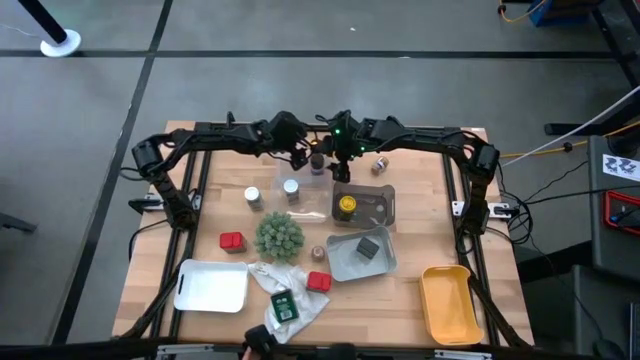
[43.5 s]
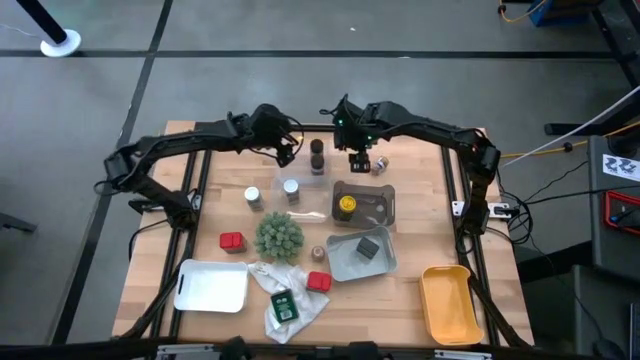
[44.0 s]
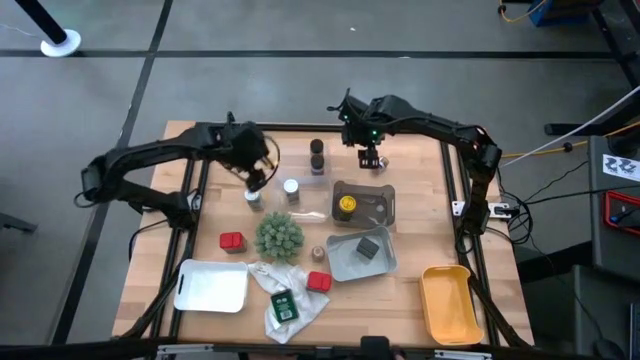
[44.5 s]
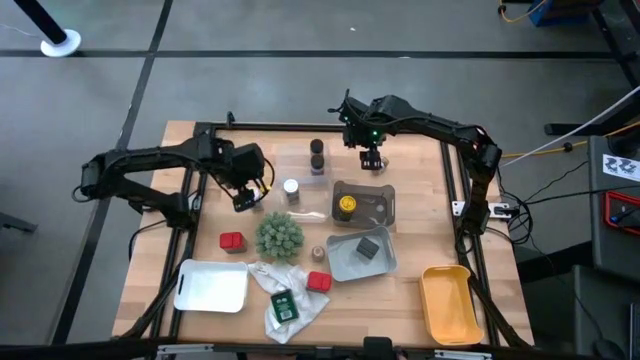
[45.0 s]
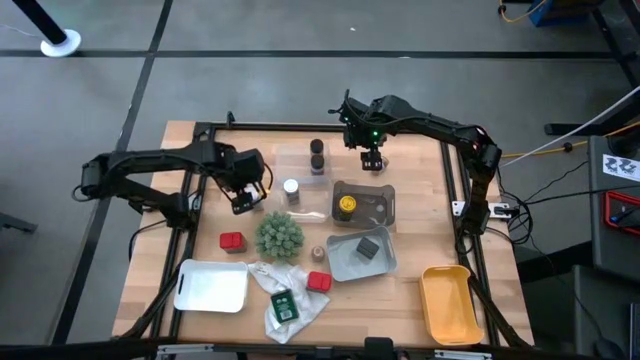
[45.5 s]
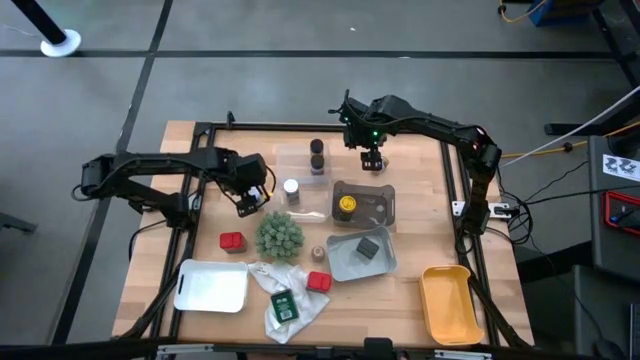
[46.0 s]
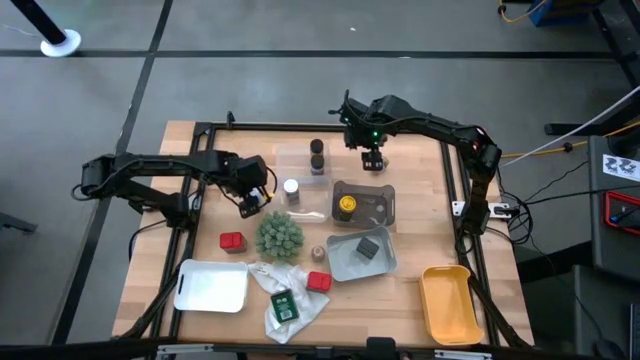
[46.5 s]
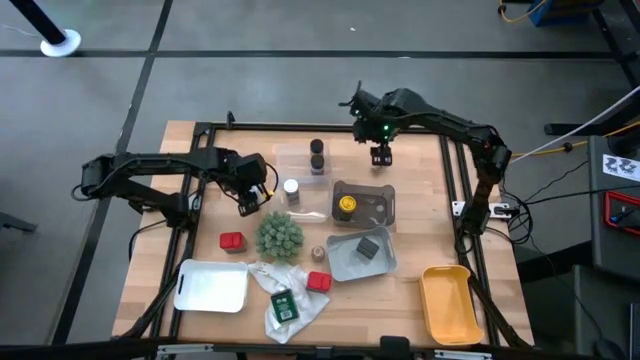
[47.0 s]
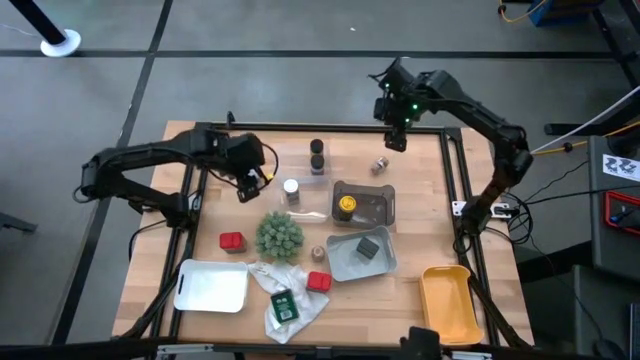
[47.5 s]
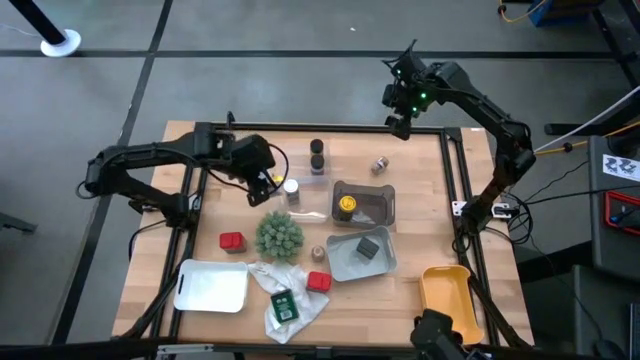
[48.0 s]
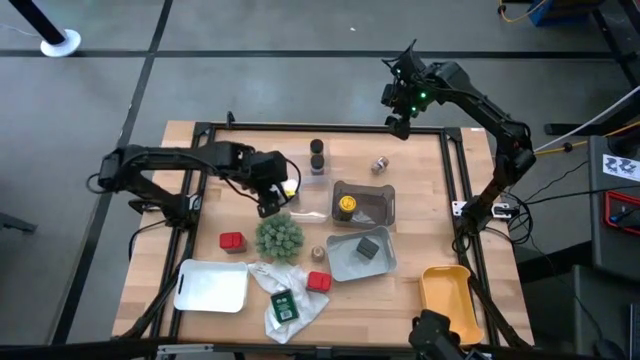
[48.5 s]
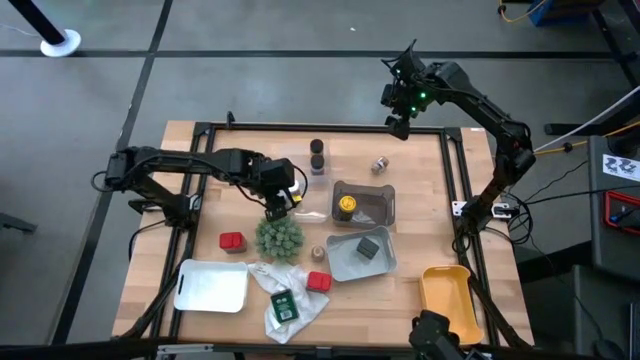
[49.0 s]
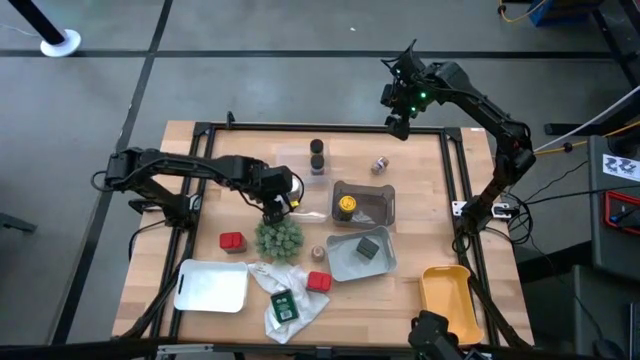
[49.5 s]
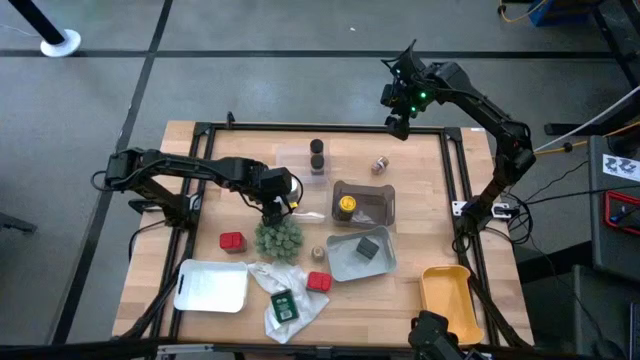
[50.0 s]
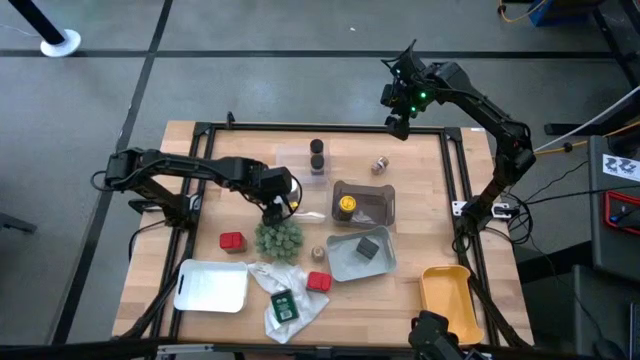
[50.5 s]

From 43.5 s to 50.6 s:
Task: Sort spices by type
Put the white seasoning bottle into the bottom transparent bin

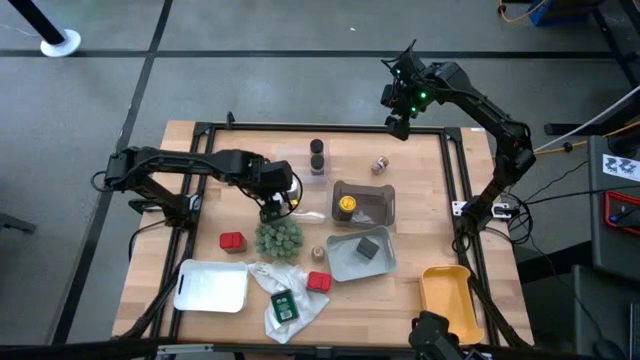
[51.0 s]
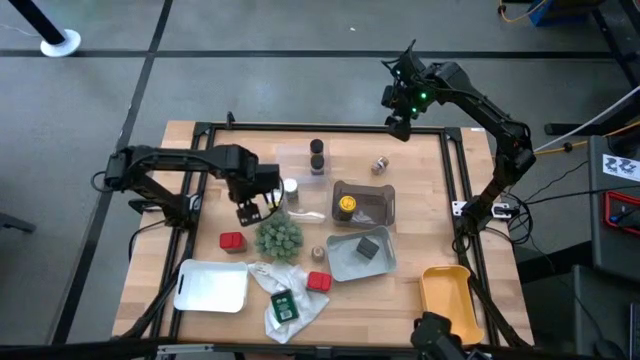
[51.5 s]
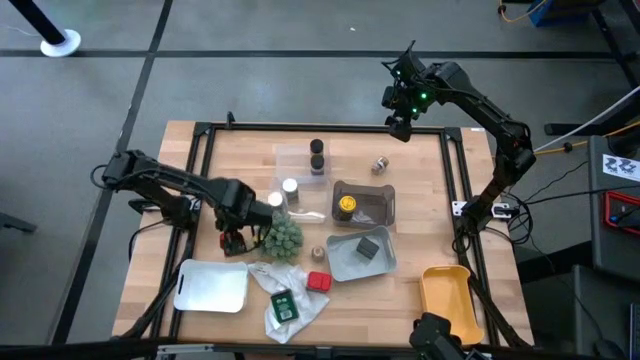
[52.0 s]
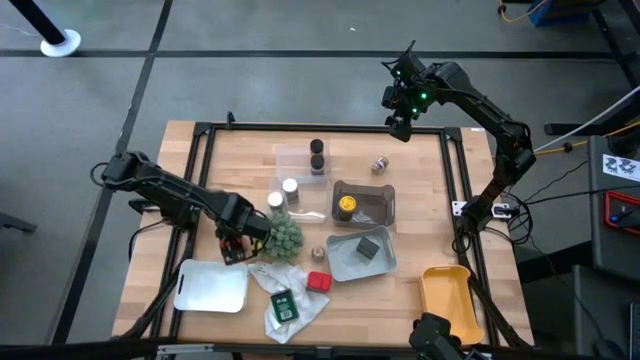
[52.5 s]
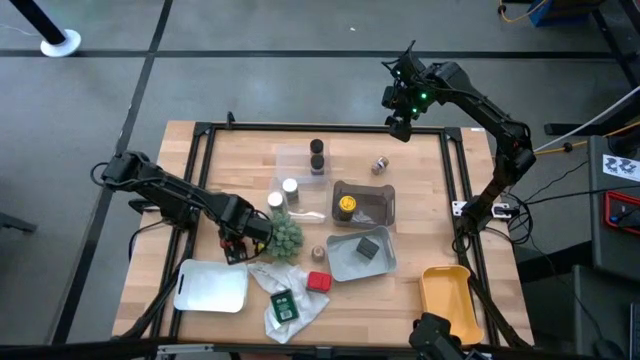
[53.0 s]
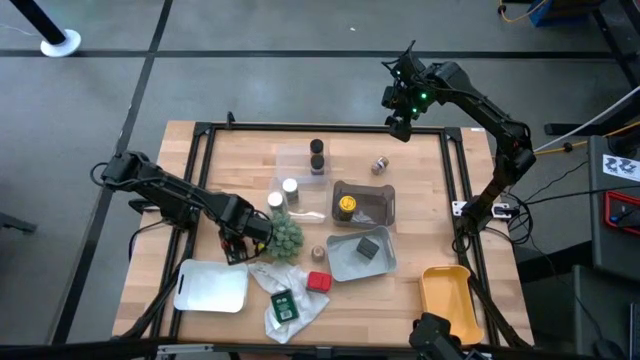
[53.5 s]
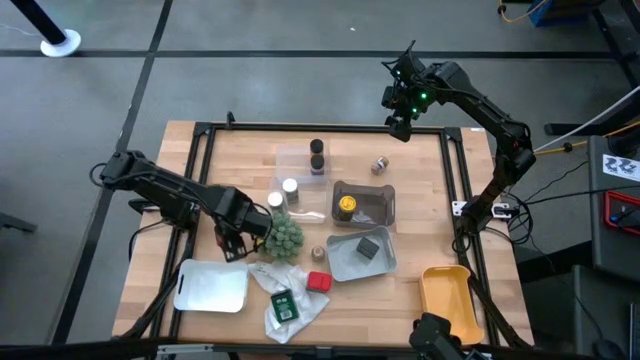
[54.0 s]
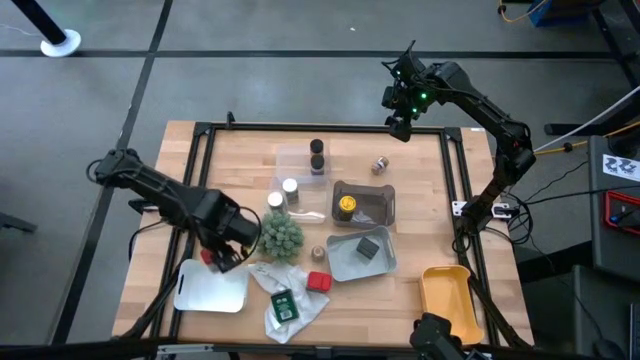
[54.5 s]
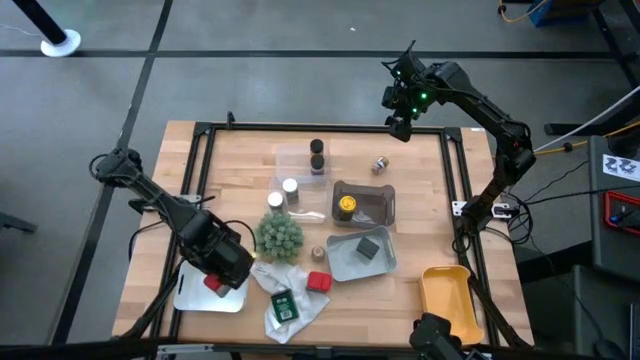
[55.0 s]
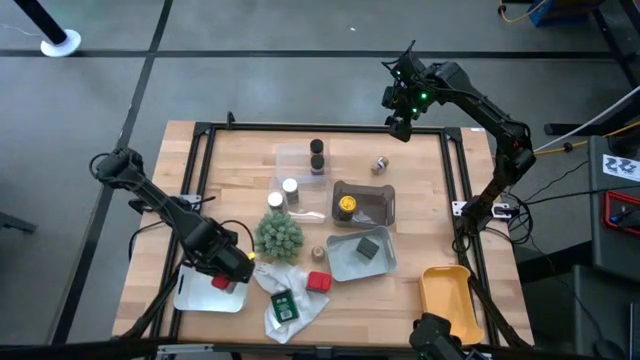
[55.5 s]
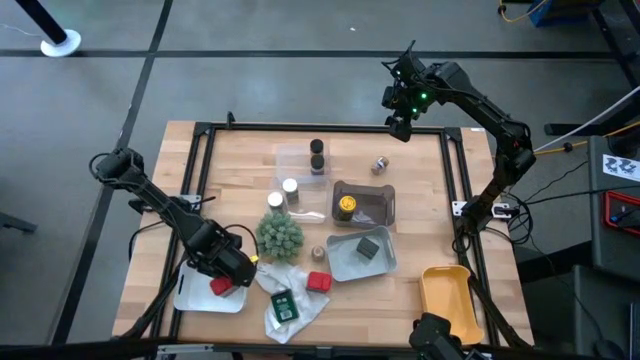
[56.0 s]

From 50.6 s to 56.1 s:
Put the left red seasoning can into the white bin

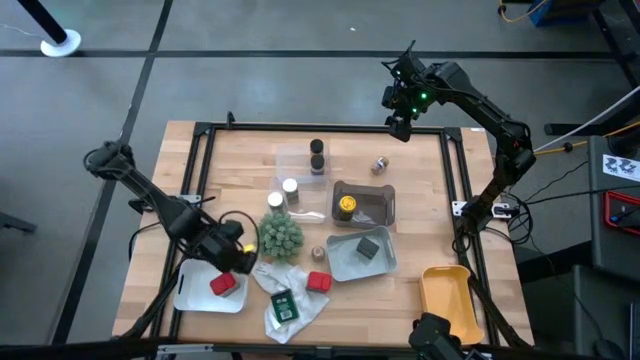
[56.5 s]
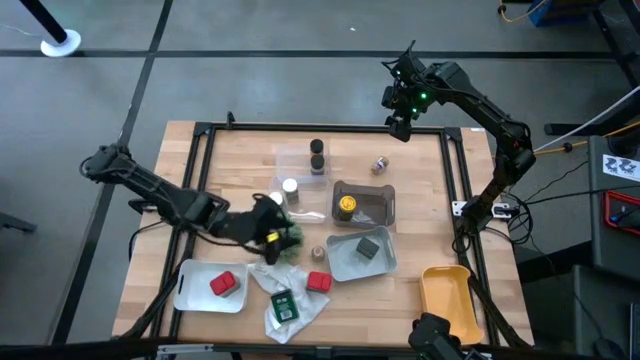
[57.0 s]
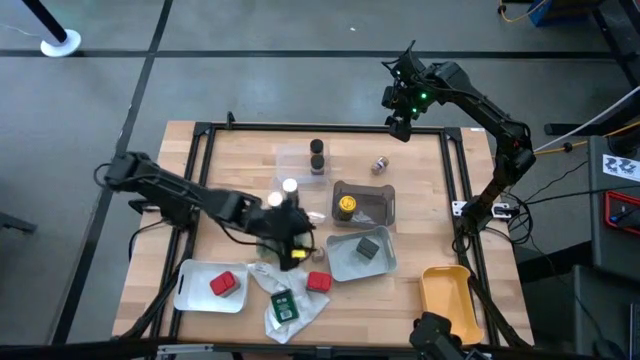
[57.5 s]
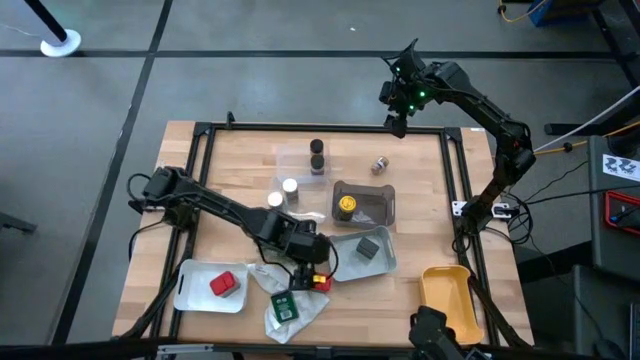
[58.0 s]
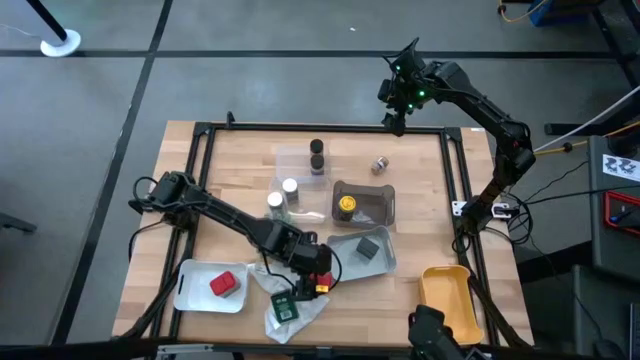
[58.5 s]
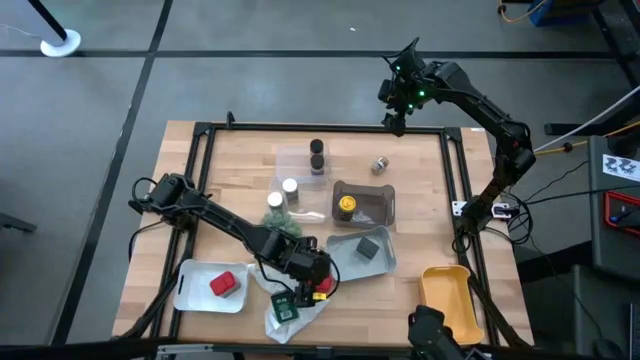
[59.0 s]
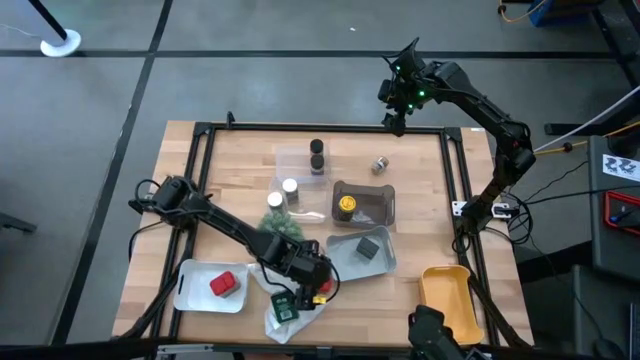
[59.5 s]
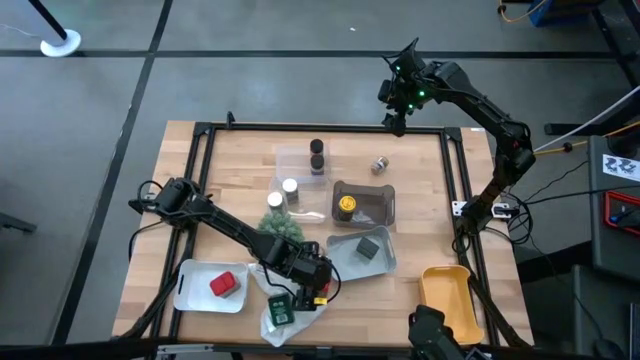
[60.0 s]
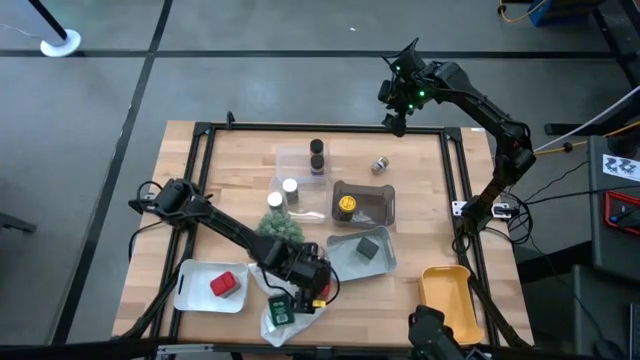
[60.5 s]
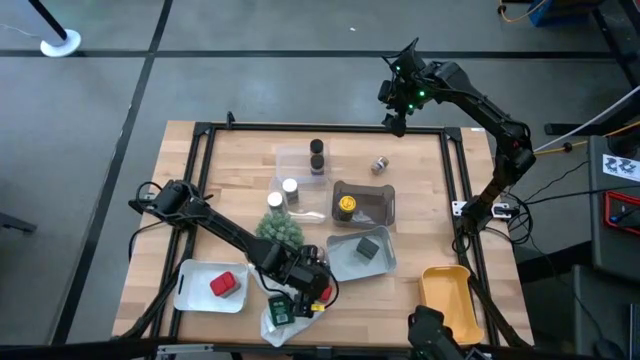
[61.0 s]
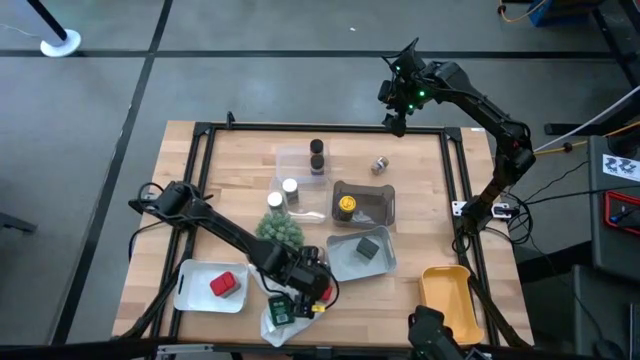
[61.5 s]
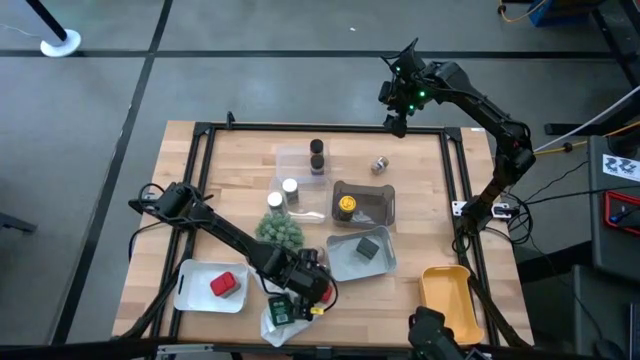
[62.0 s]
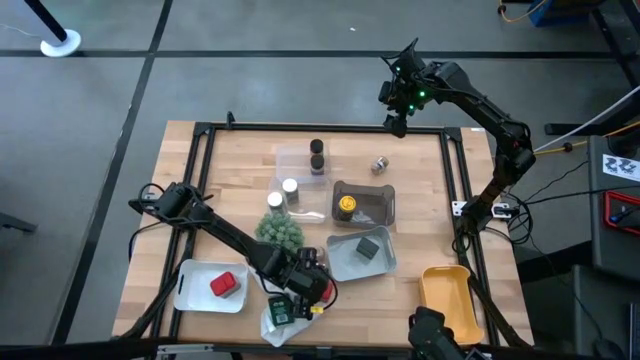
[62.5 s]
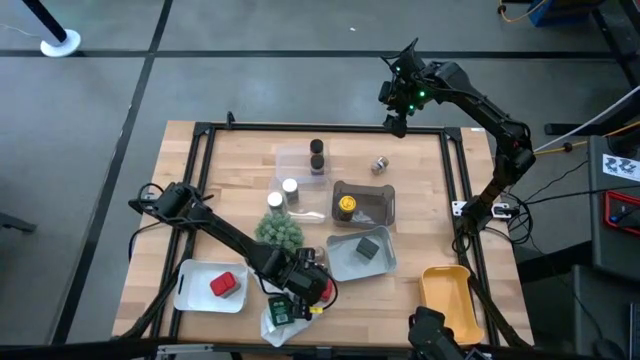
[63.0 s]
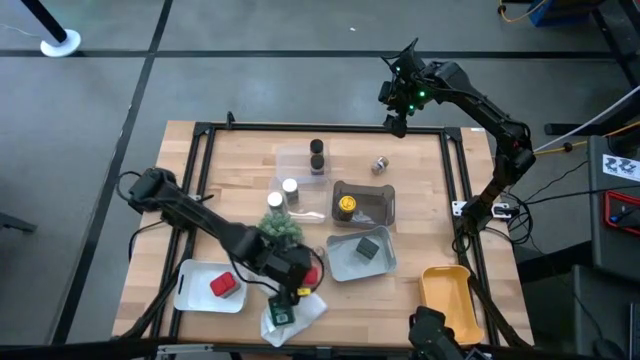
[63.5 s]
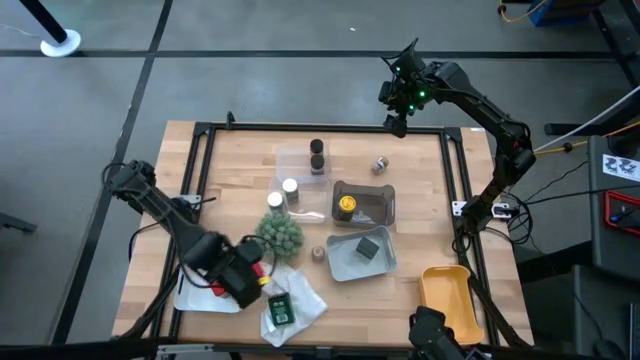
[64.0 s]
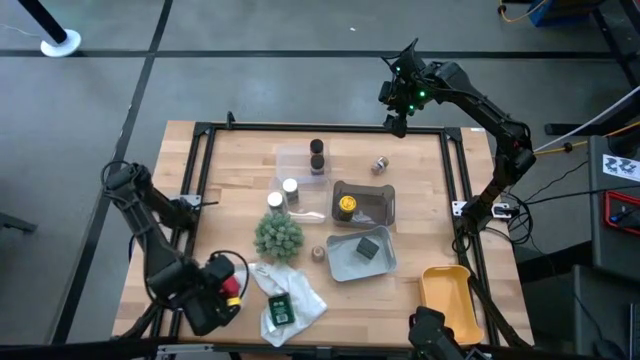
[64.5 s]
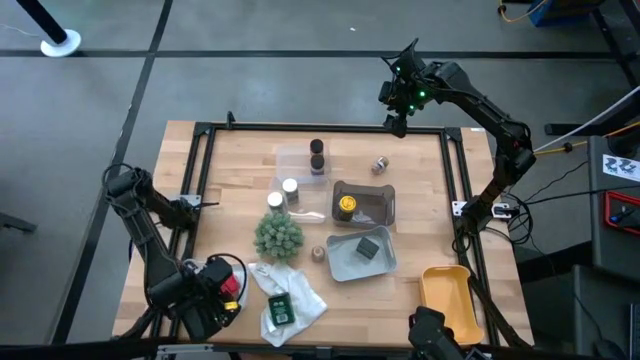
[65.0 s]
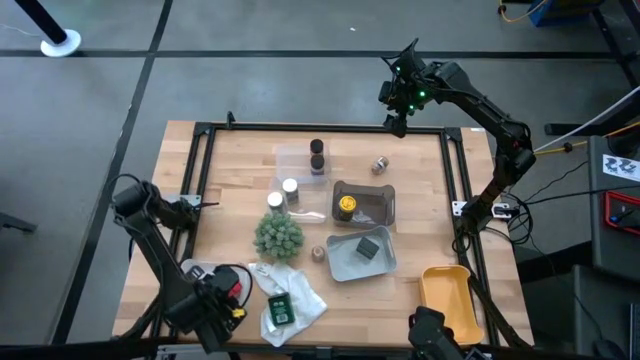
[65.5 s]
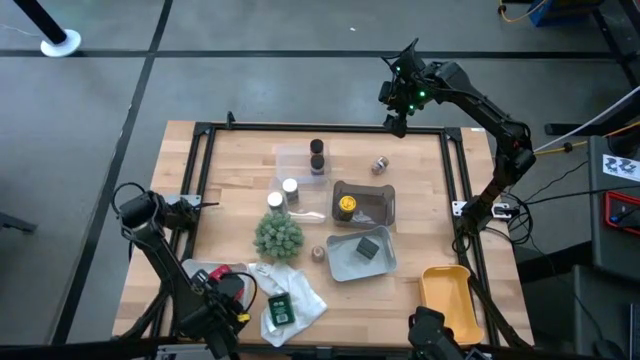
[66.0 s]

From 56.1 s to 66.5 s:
Put the red seasoning can into the white bin
